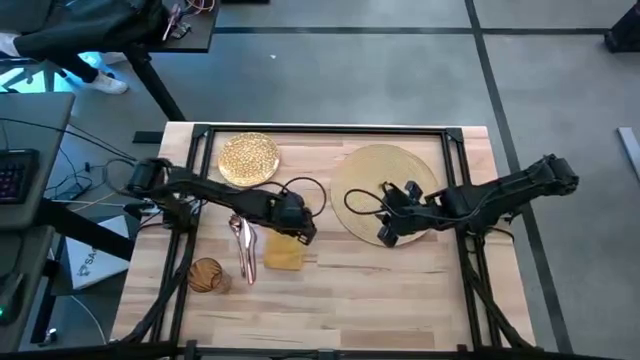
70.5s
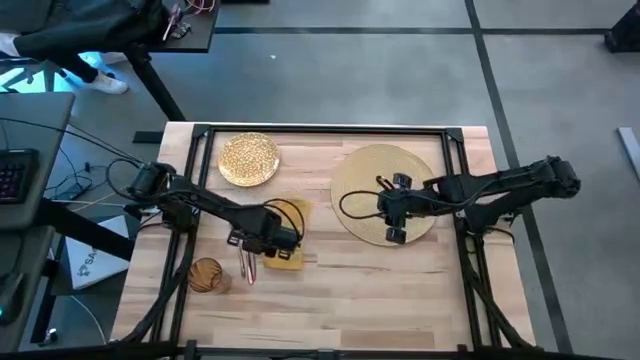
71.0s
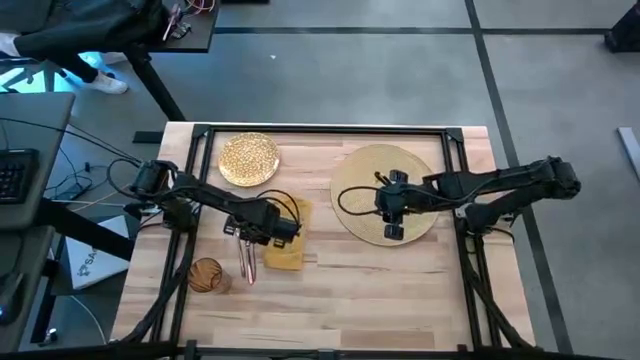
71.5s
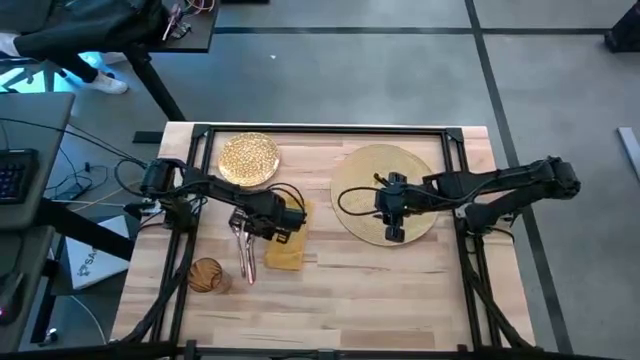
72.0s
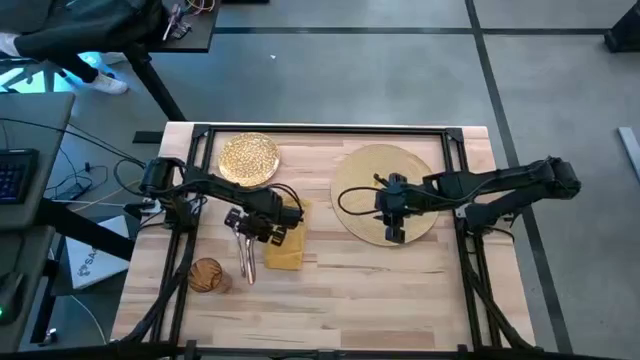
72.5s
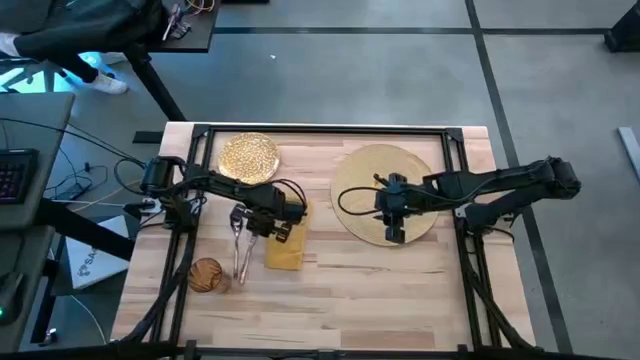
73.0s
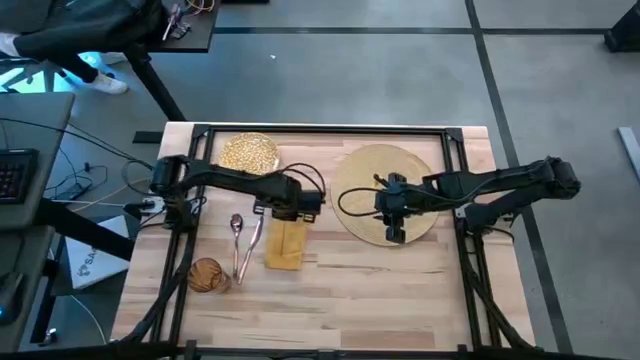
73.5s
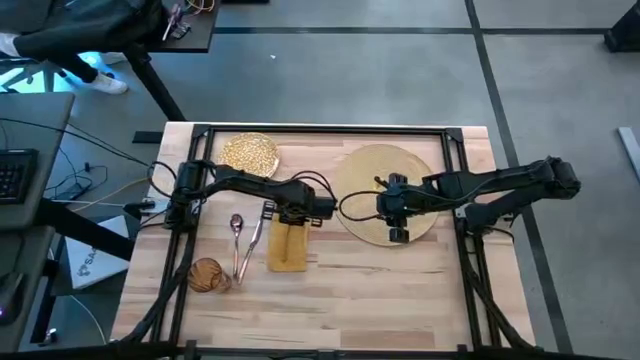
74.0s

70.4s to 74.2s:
Task: Set table place
Put the brown fork on the yellow table napkin

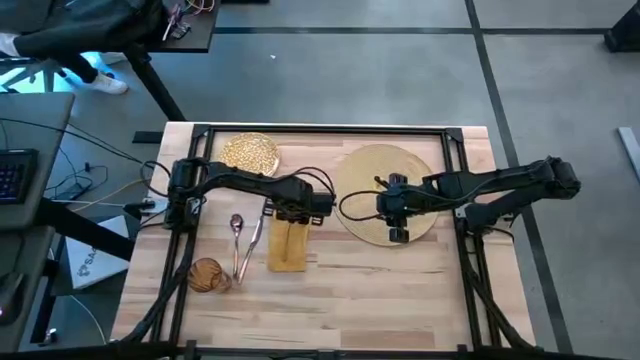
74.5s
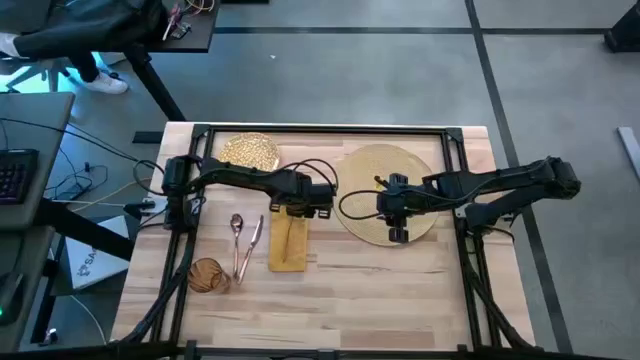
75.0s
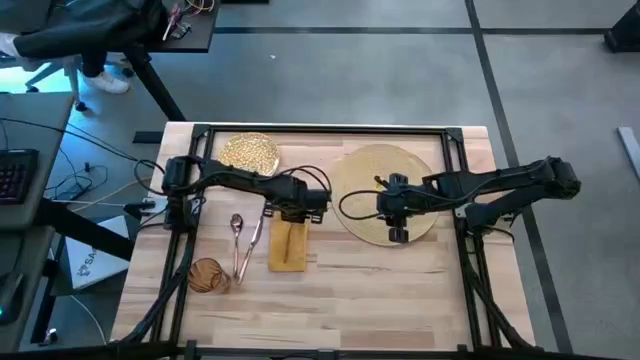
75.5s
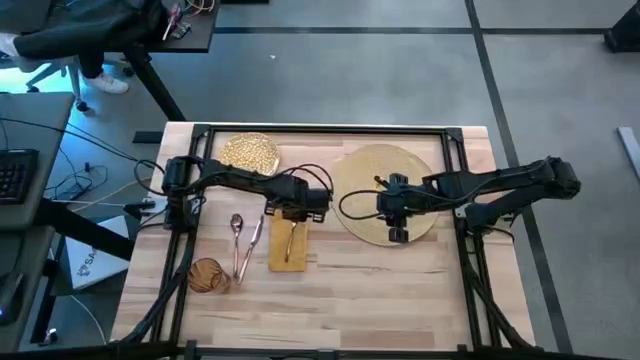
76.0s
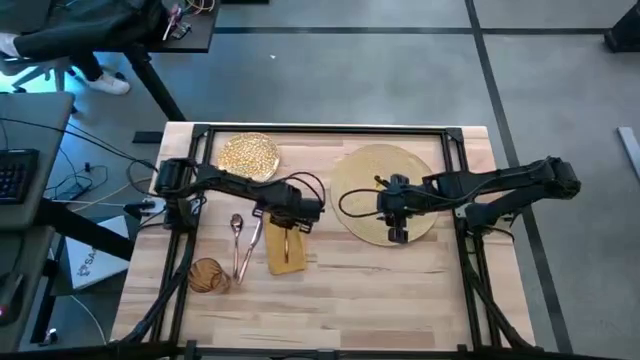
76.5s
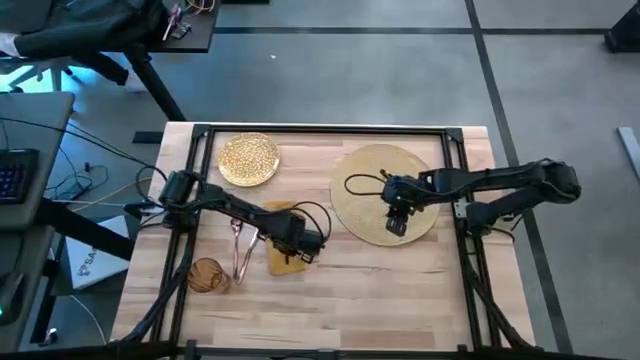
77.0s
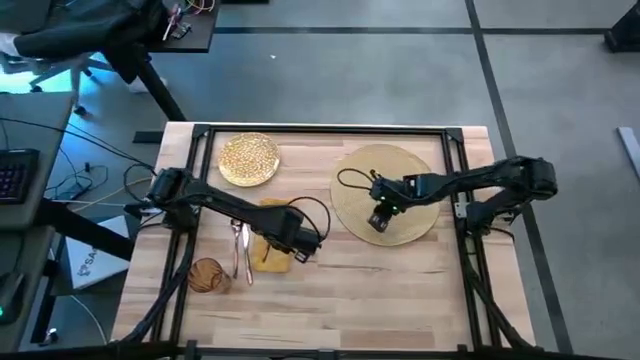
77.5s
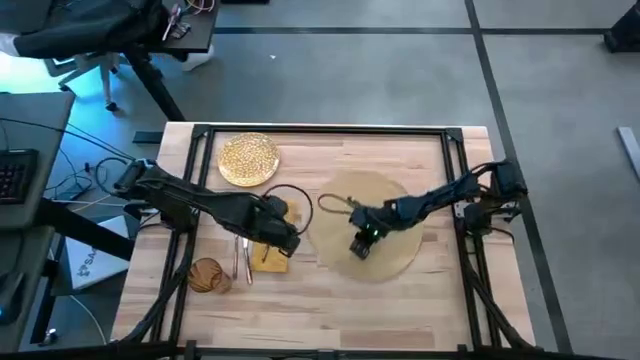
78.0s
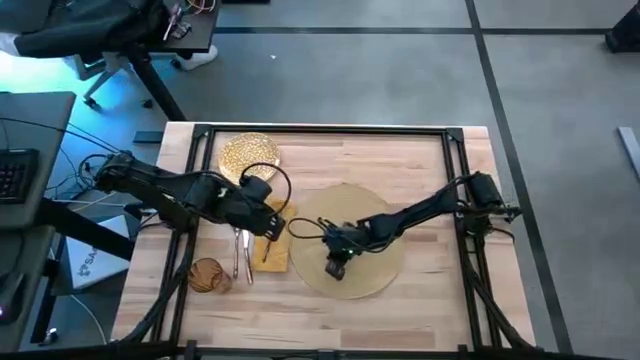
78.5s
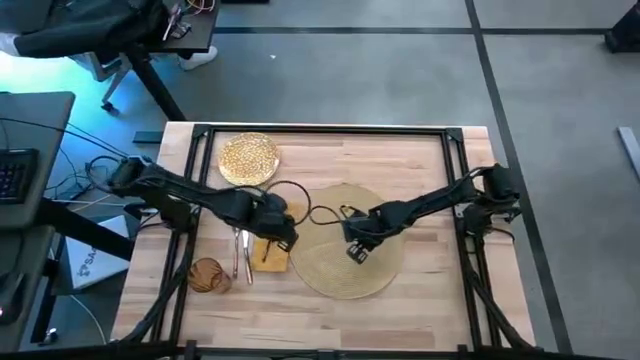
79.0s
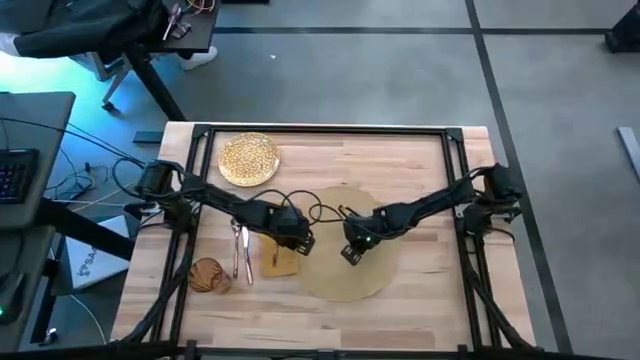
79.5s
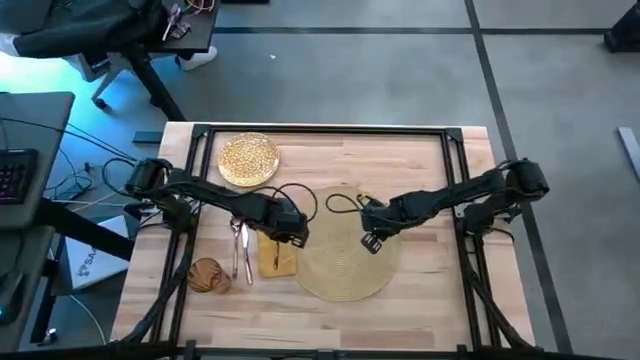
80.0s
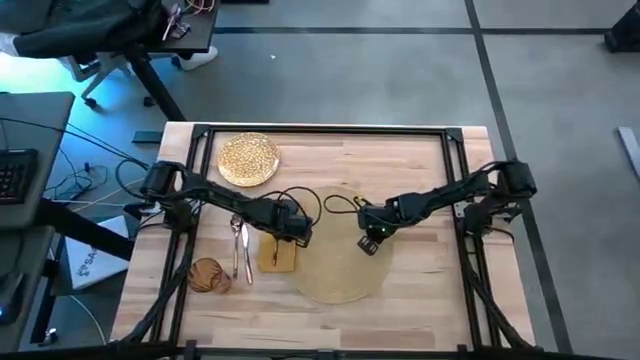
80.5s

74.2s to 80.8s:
Move the brown placemat to the center of the table

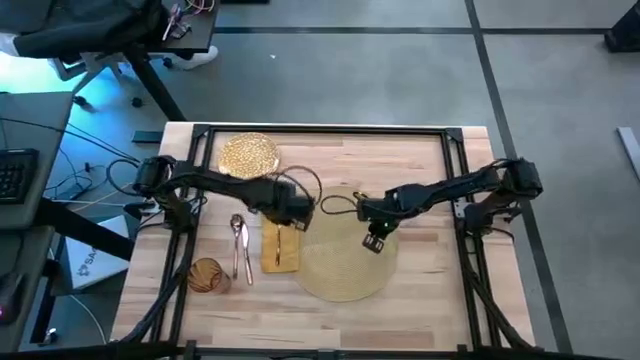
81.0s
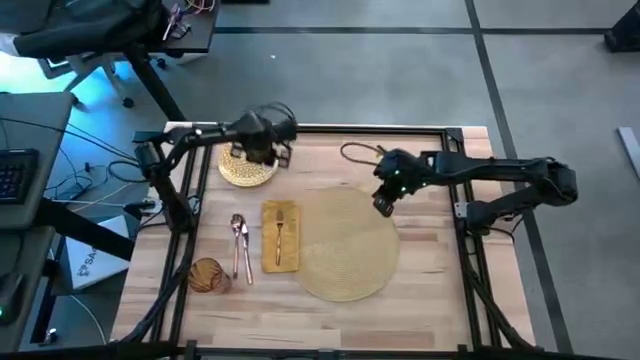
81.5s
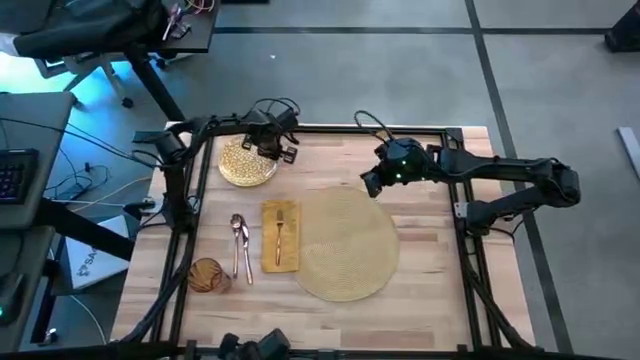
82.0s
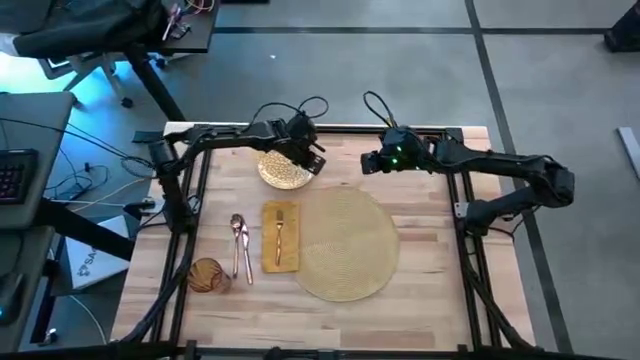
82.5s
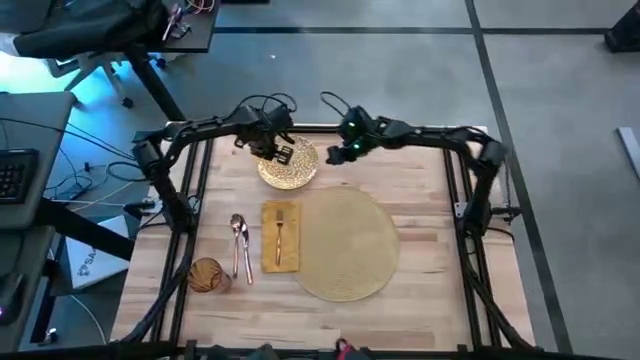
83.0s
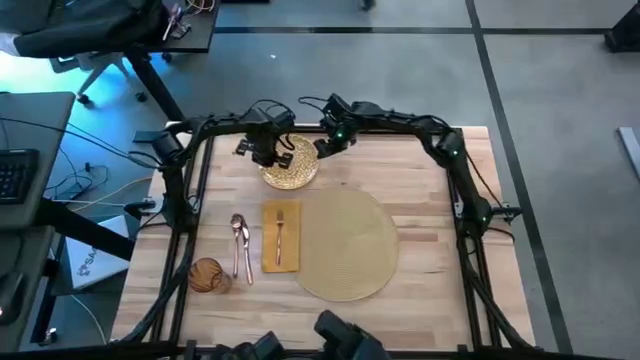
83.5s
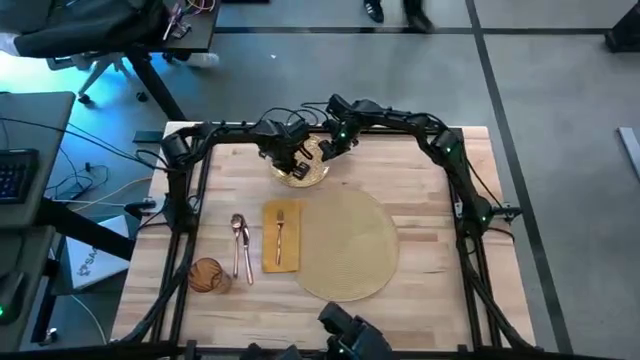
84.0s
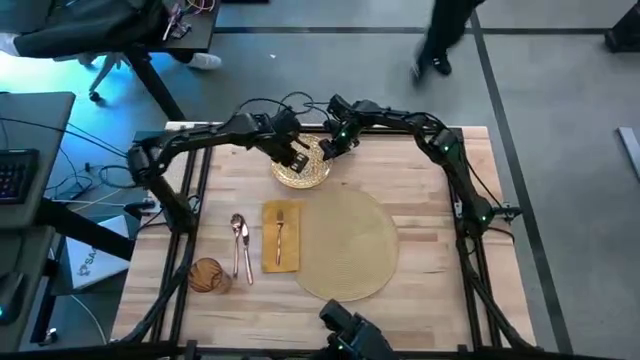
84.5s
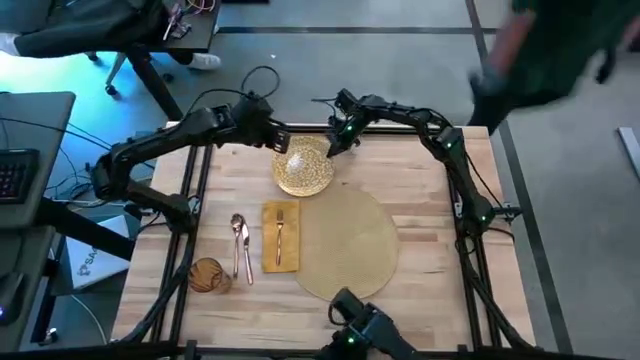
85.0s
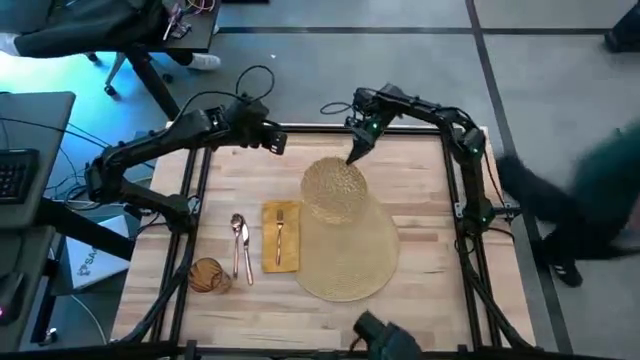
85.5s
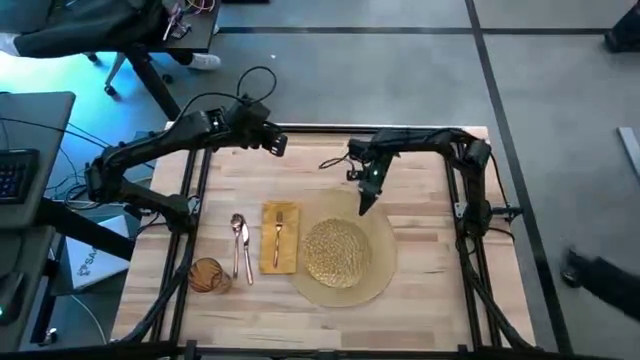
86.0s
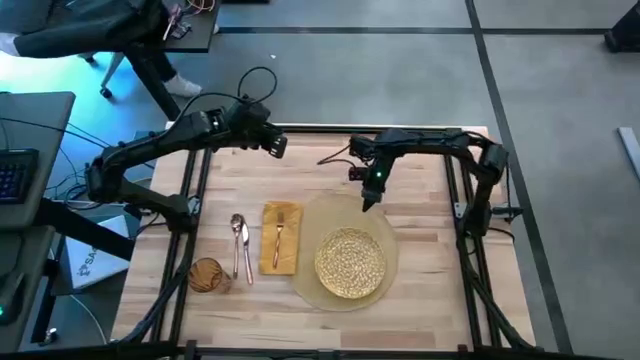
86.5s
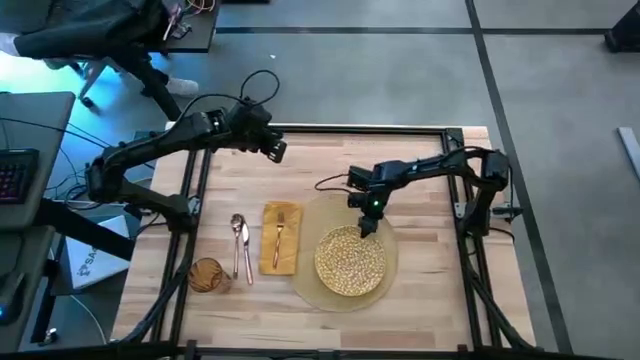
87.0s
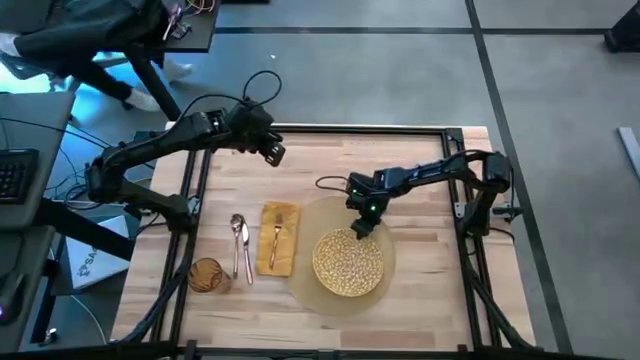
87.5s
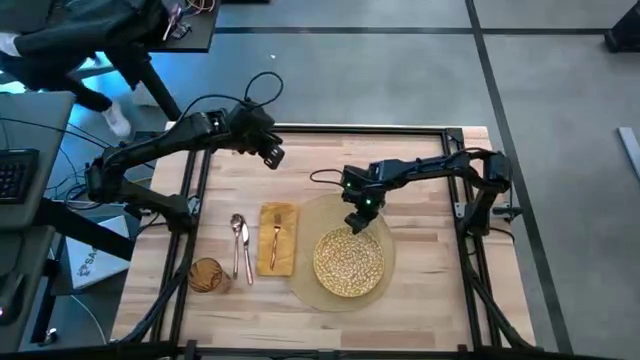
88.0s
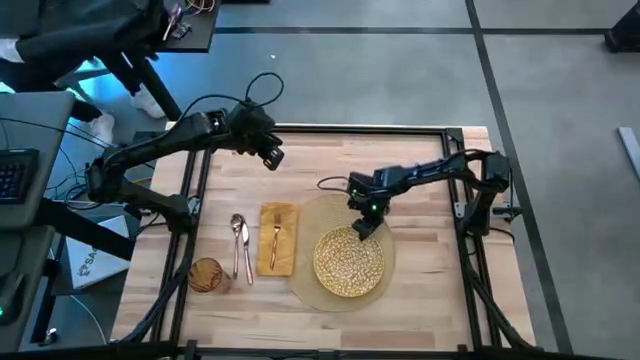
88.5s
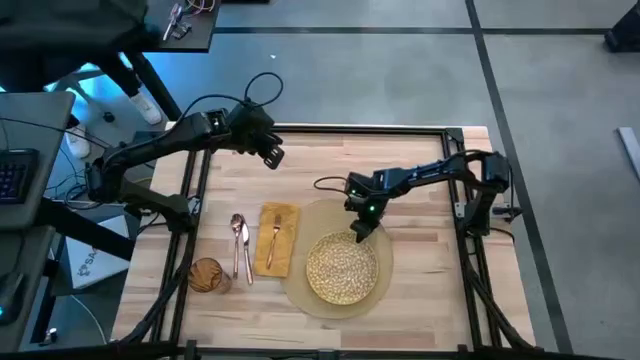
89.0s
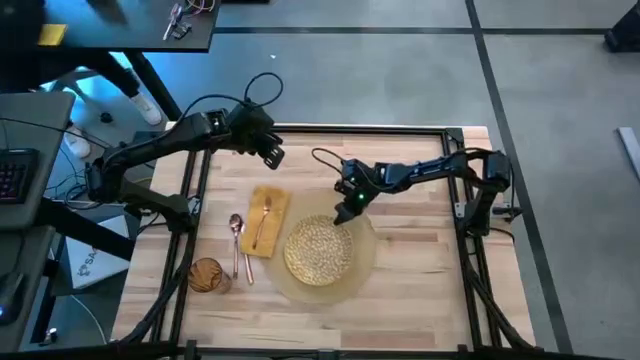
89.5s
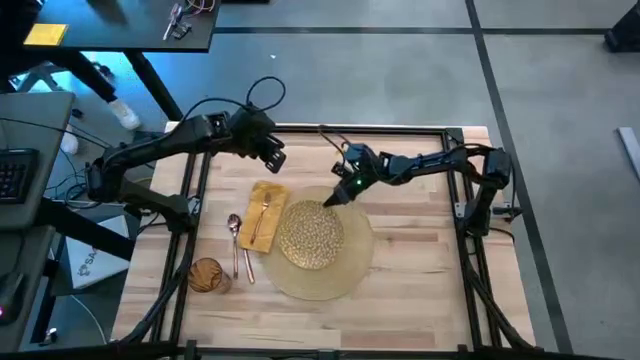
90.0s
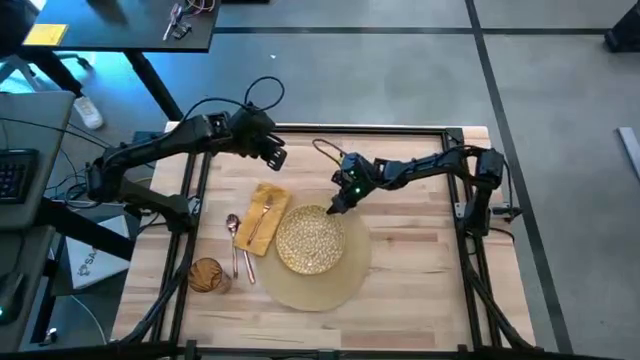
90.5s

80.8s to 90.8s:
Put the yellow plate on the brown placemat

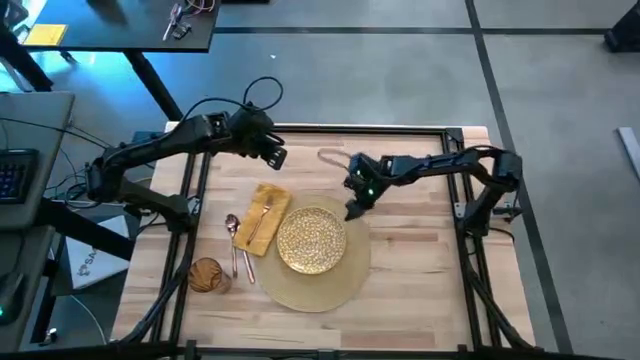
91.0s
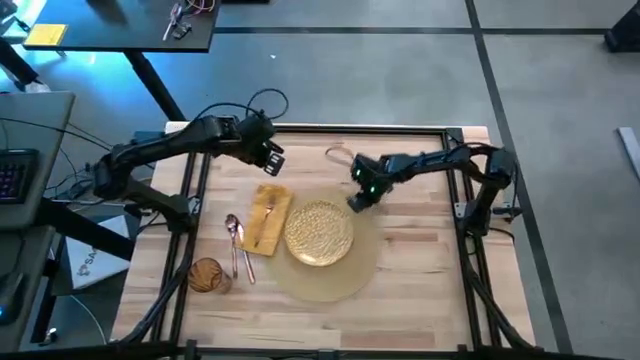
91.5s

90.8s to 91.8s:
Adjust the brown placemat on the table

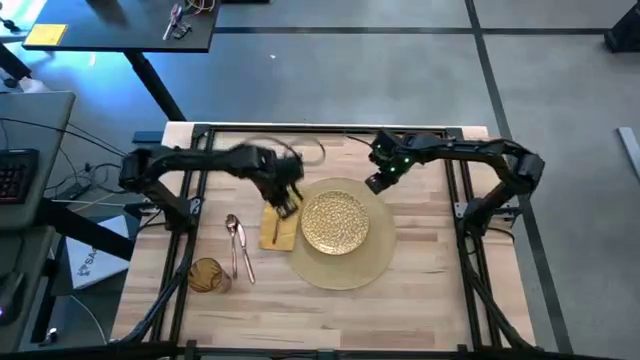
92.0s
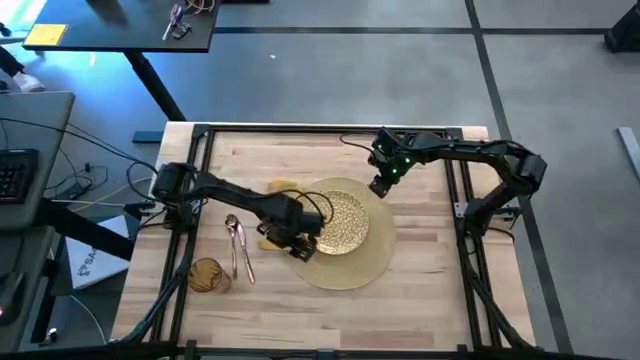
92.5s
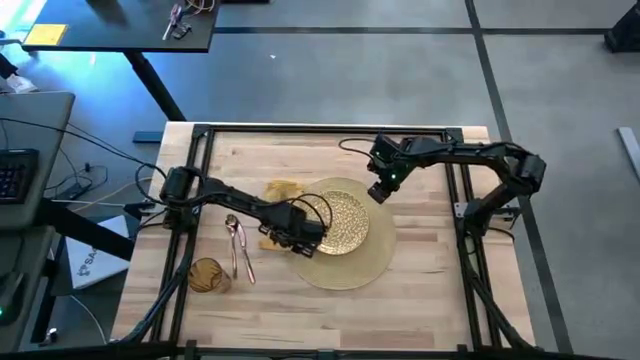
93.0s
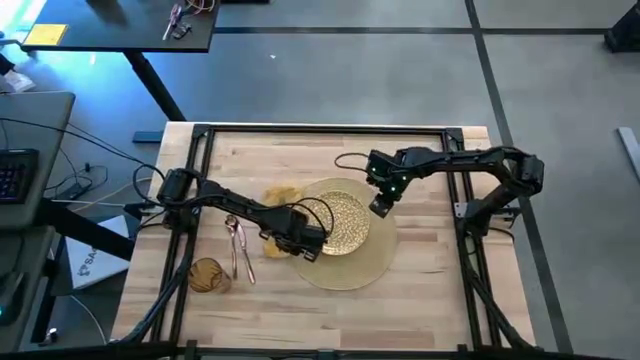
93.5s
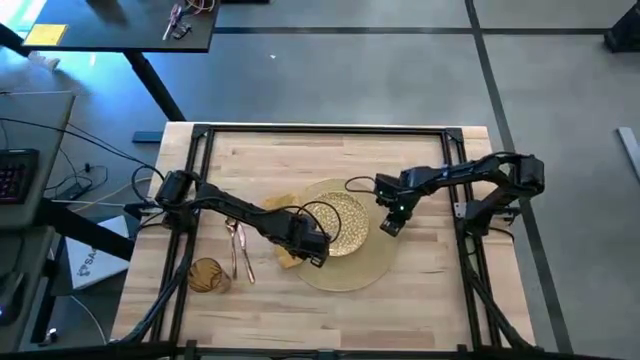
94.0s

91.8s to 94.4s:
Adjust the yellow table napkin on the table
